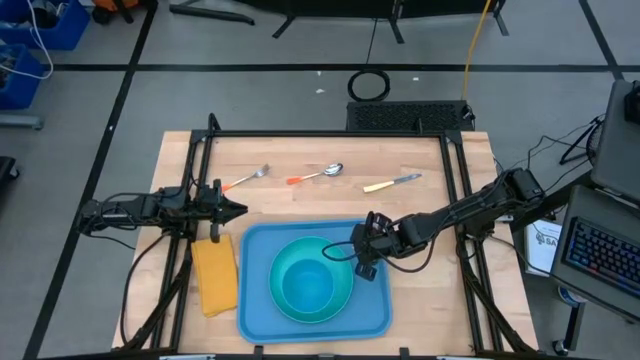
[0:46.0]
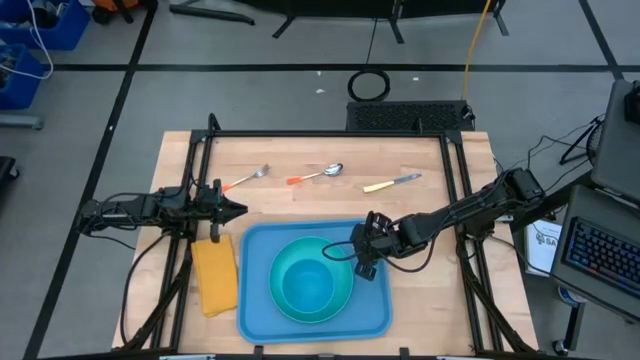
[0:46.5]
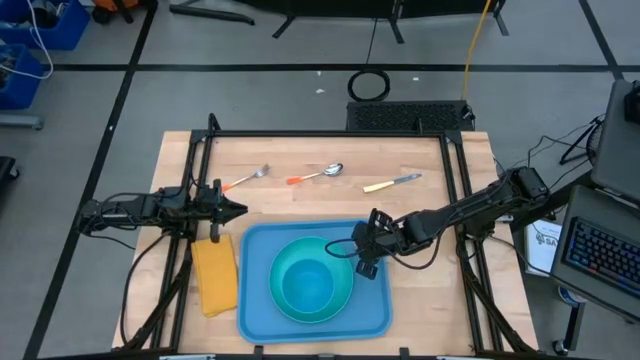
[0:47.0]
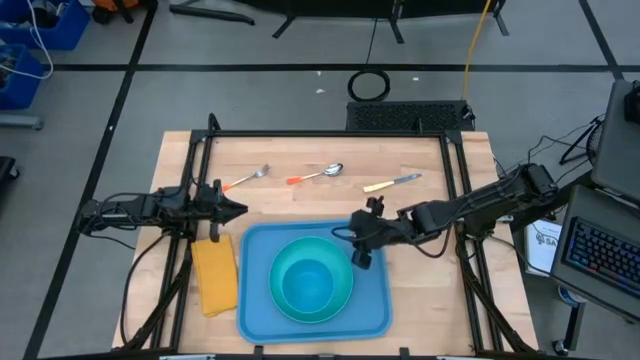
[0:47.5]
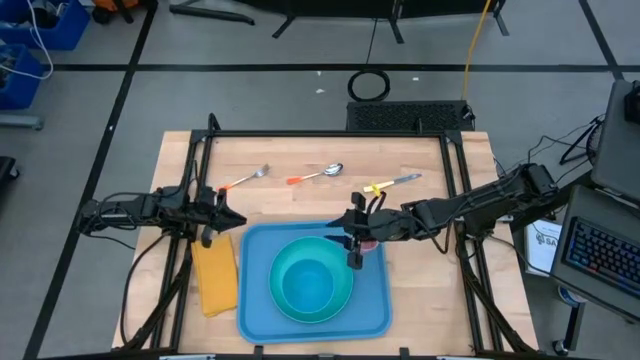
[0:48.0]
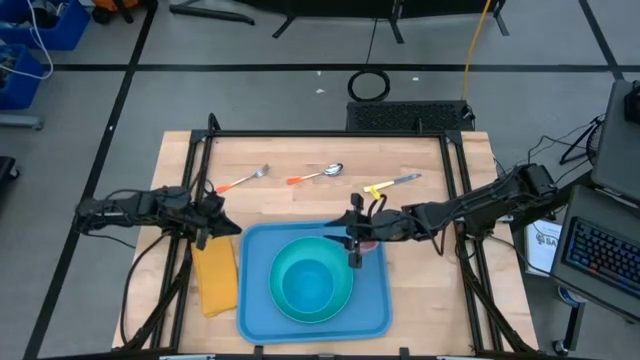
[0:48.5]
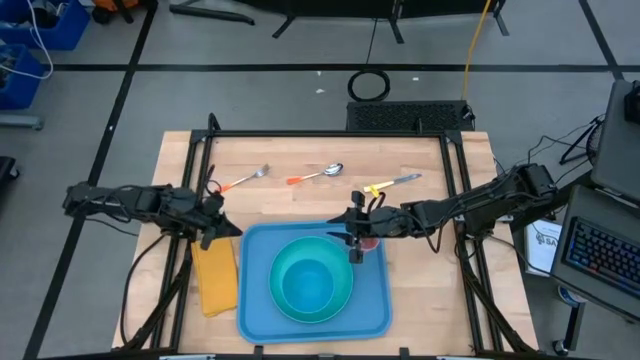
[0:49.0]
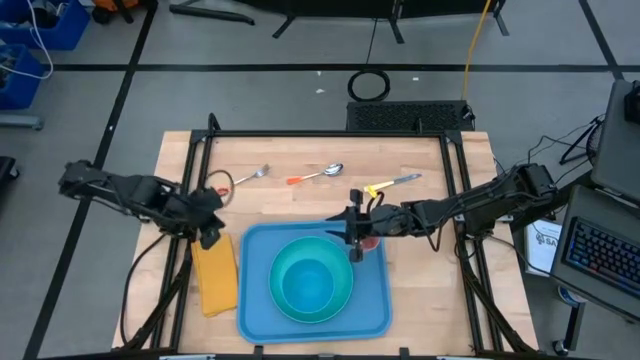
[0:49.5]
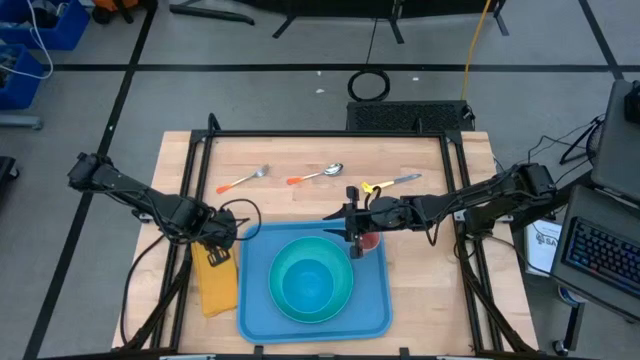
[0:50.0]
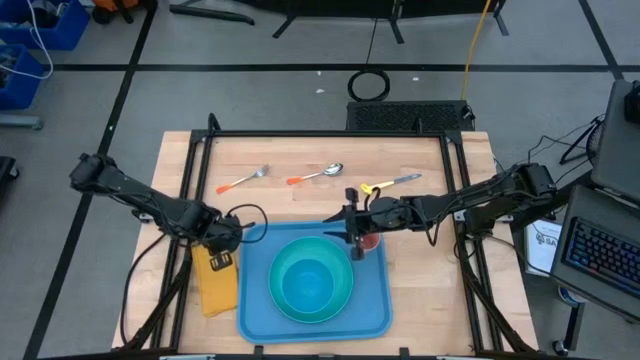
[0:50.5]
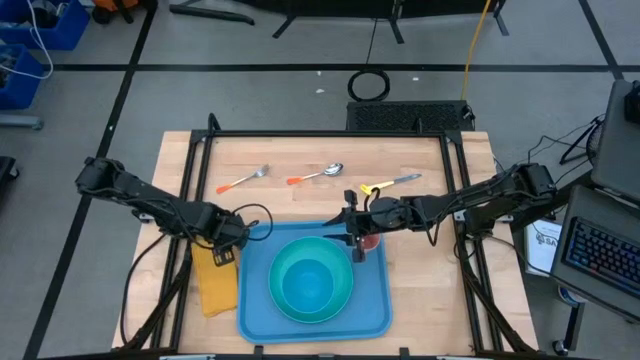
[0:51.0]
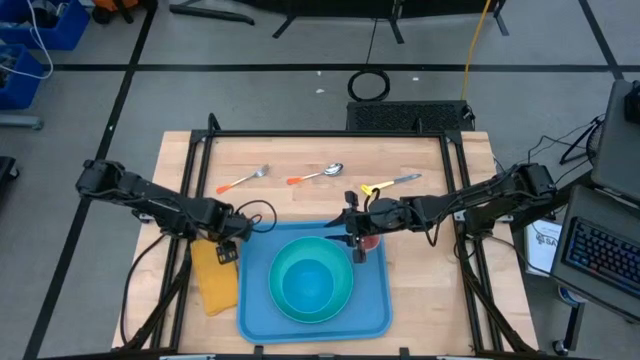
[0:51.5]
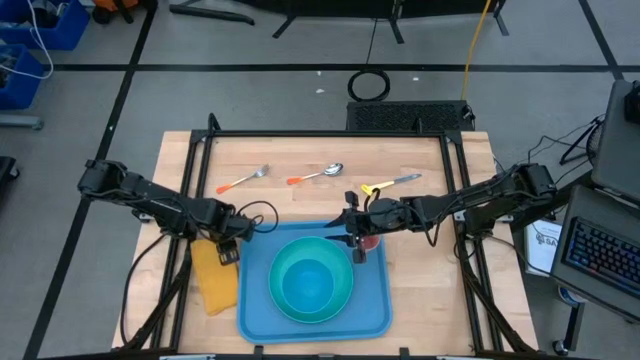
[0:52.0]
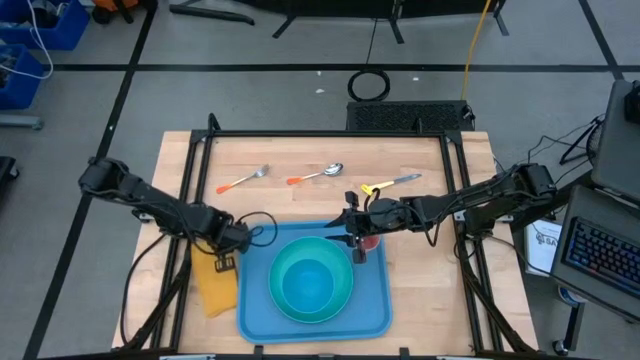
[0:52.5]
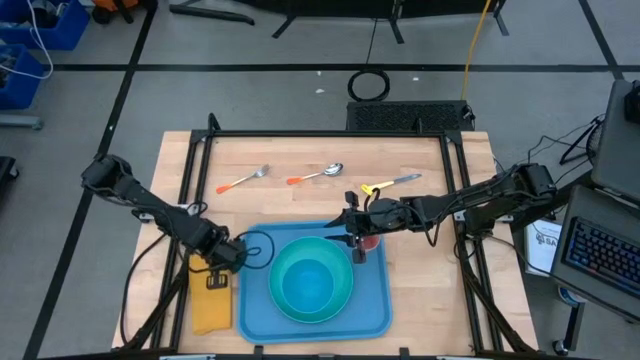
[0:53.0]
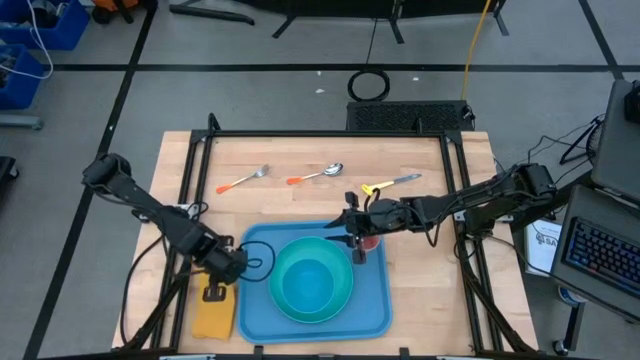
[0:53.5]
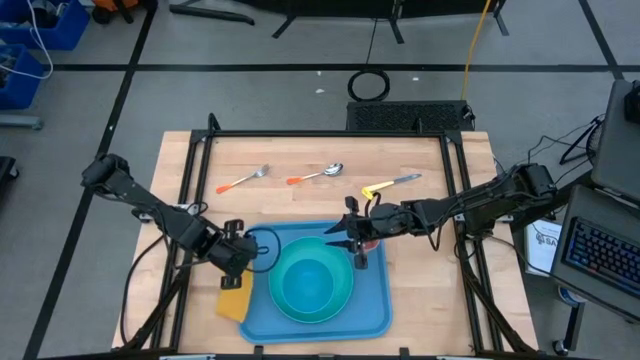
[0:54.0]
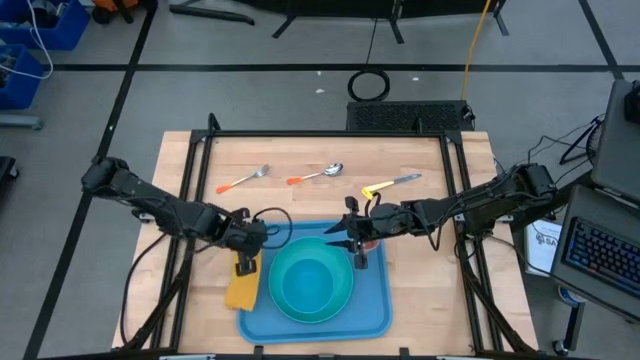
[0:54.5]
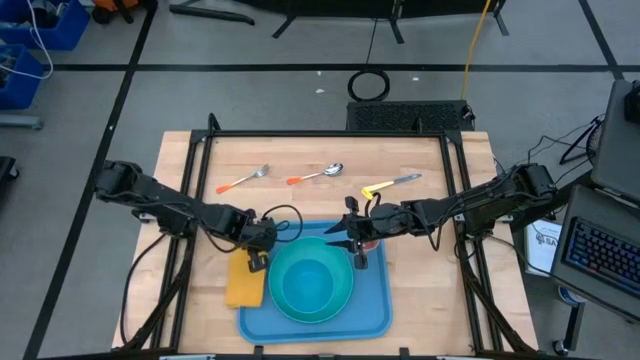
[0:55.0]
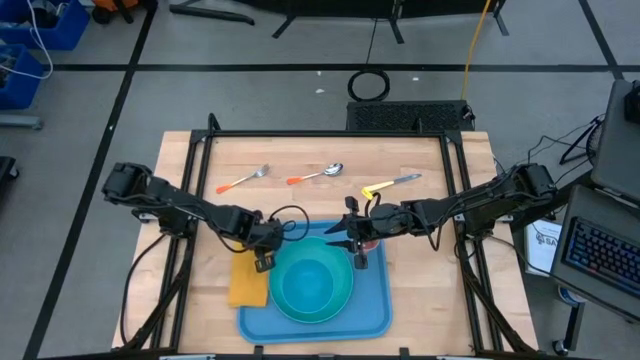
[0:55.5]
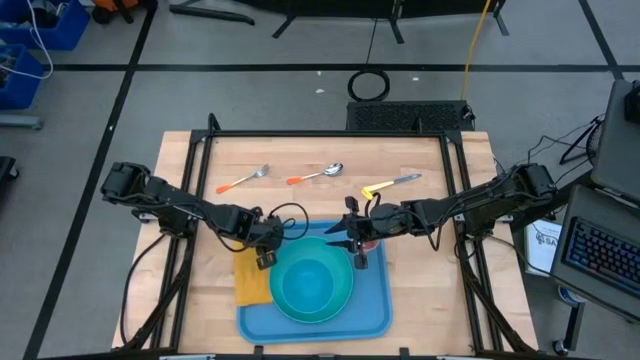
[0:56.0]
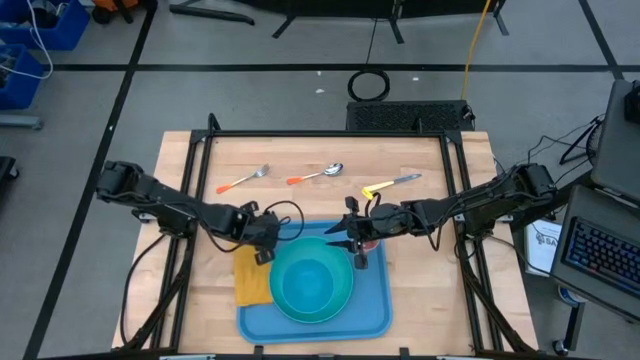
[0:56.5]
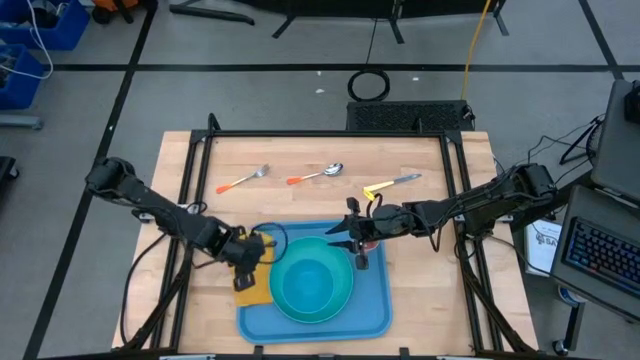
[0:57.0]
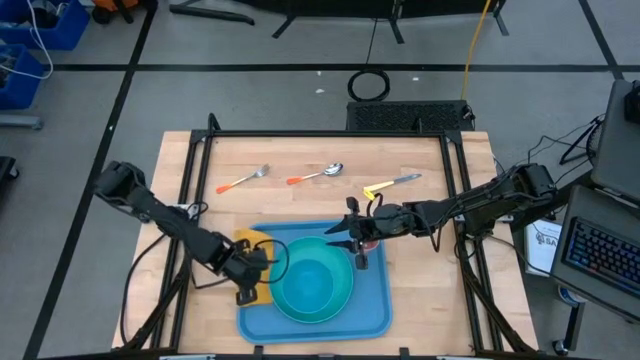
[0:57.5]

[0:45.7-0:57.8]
Task: Set up tray
Put the napkin on the serving tray to the left of the plate

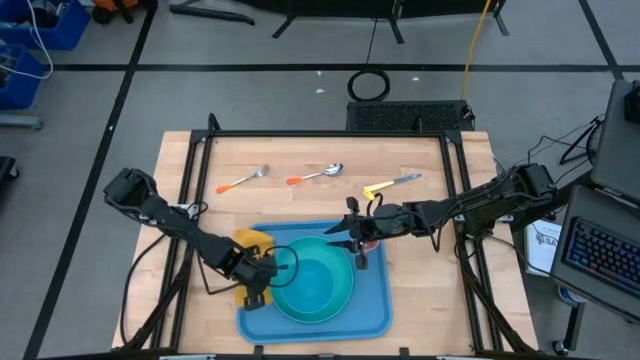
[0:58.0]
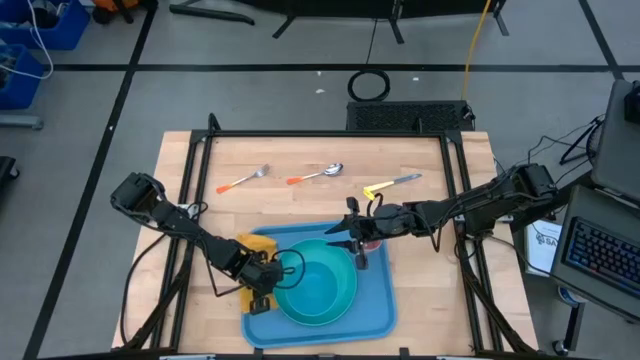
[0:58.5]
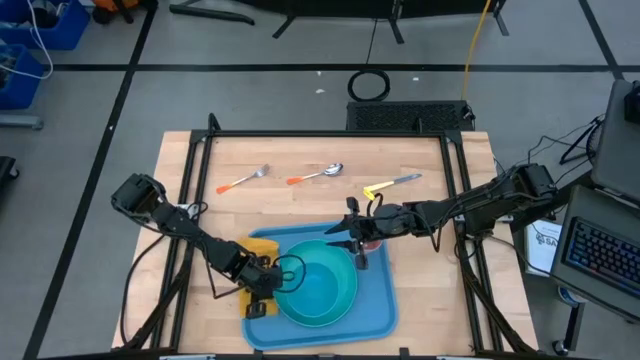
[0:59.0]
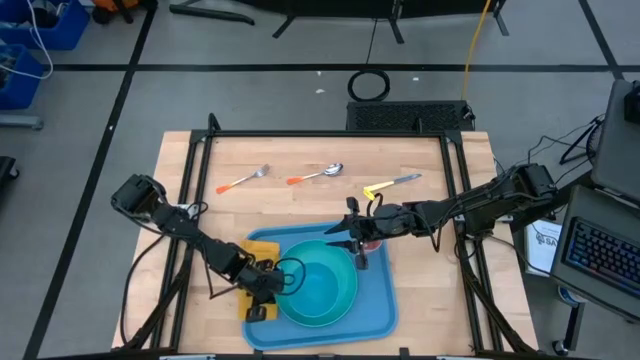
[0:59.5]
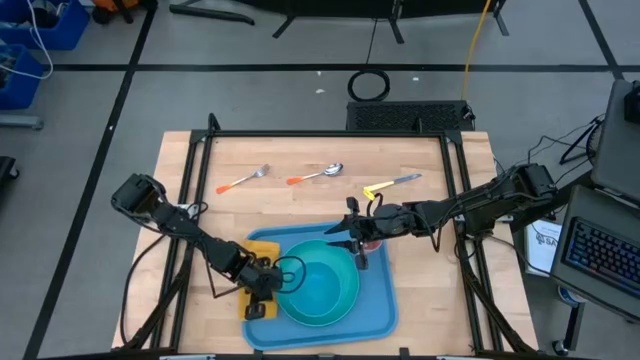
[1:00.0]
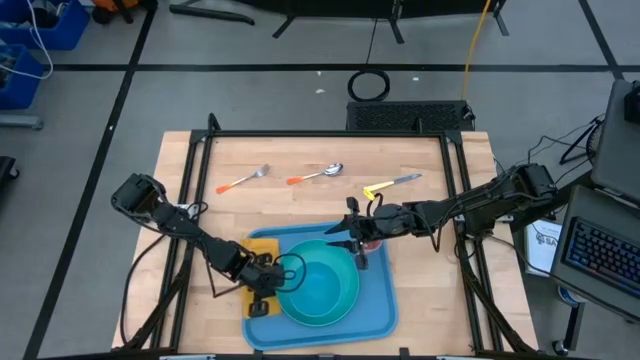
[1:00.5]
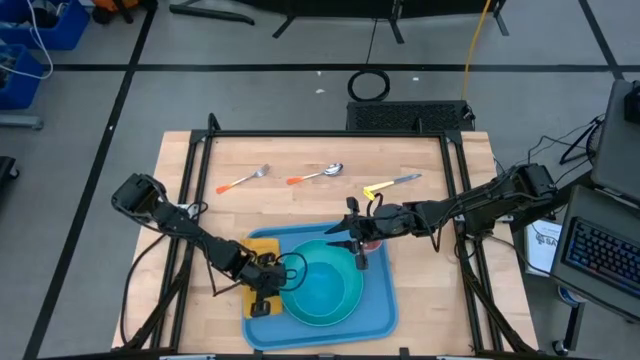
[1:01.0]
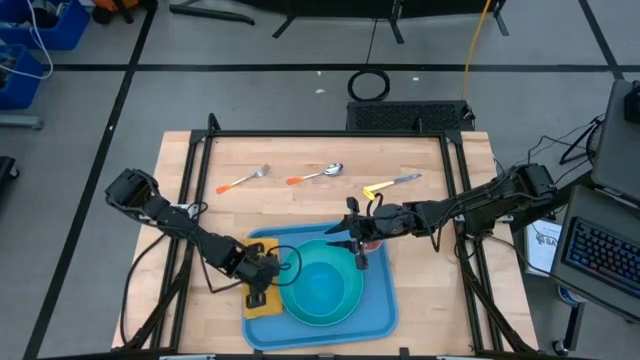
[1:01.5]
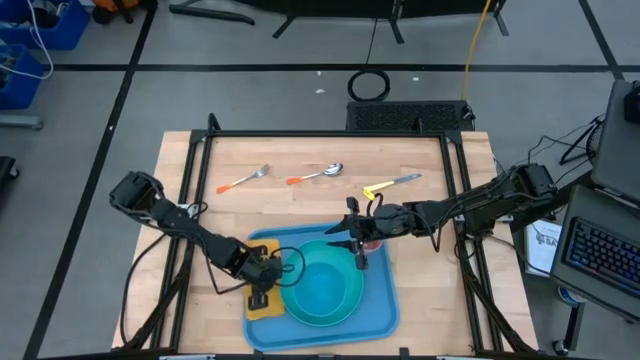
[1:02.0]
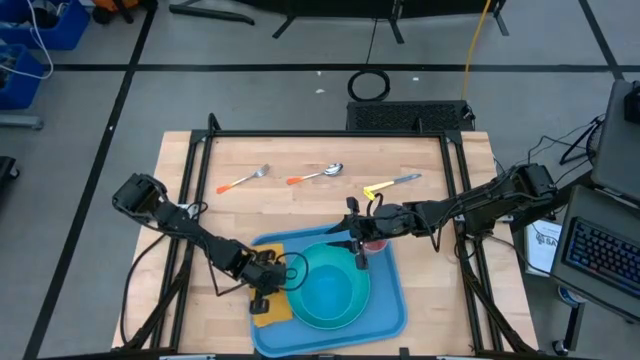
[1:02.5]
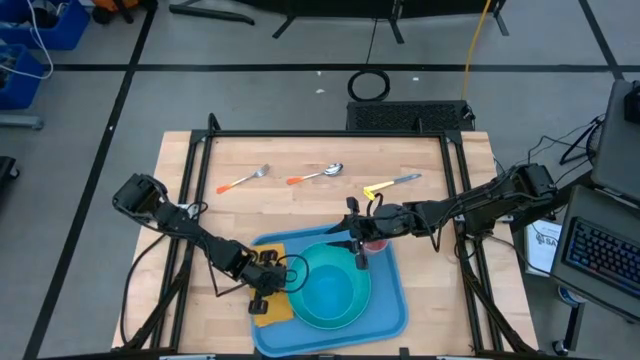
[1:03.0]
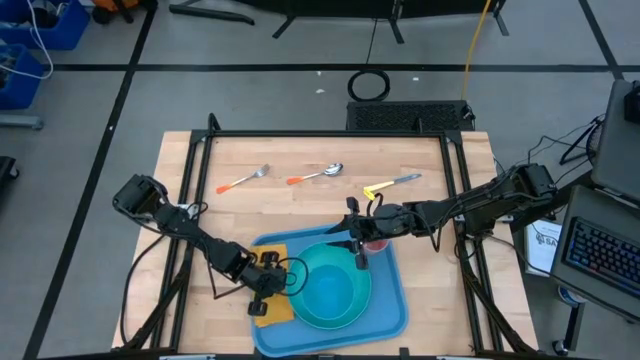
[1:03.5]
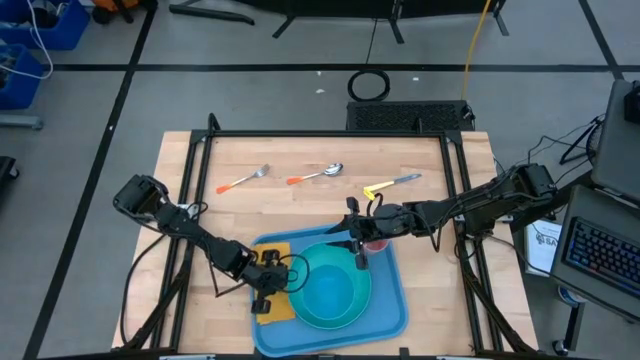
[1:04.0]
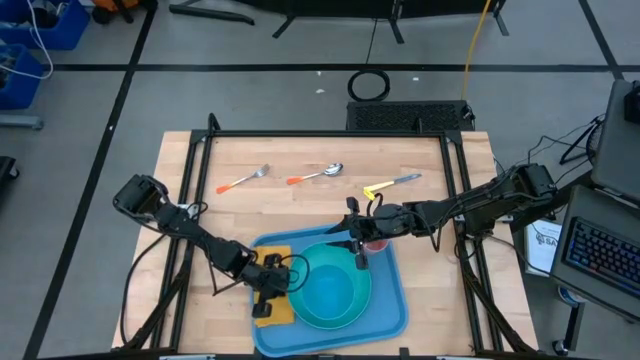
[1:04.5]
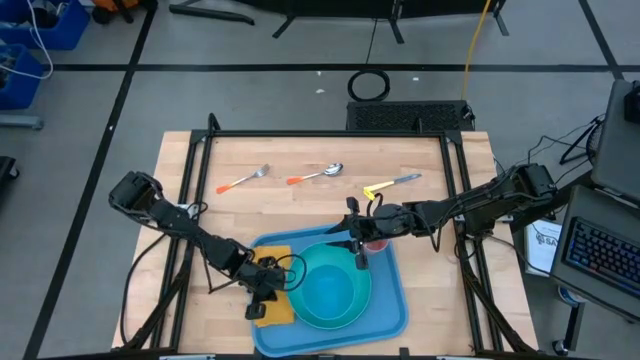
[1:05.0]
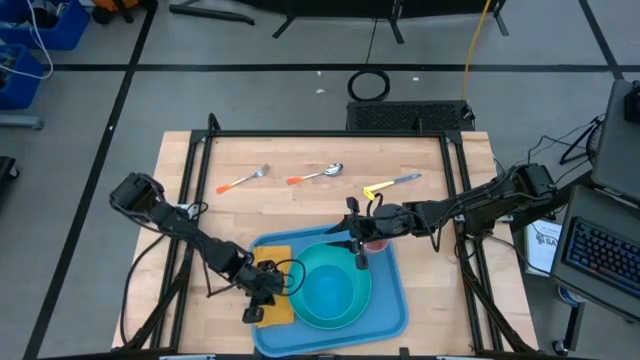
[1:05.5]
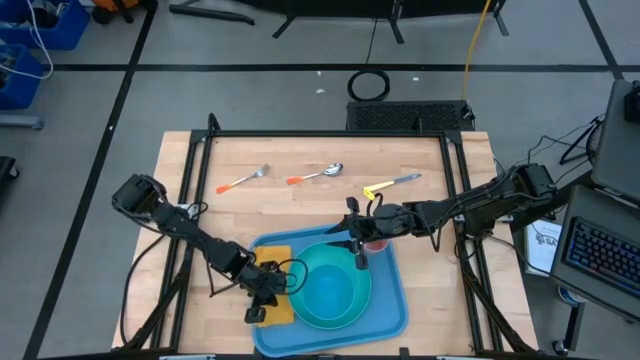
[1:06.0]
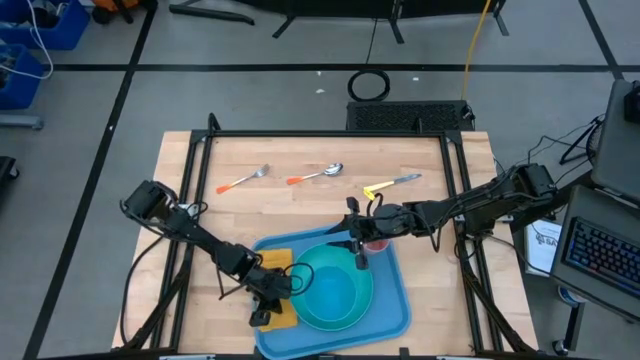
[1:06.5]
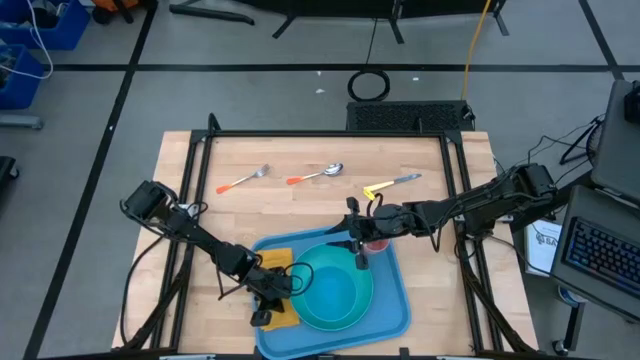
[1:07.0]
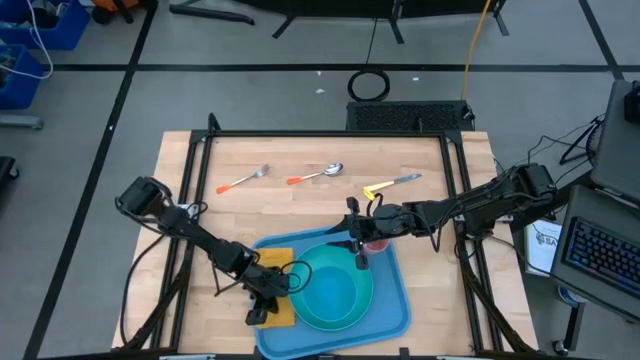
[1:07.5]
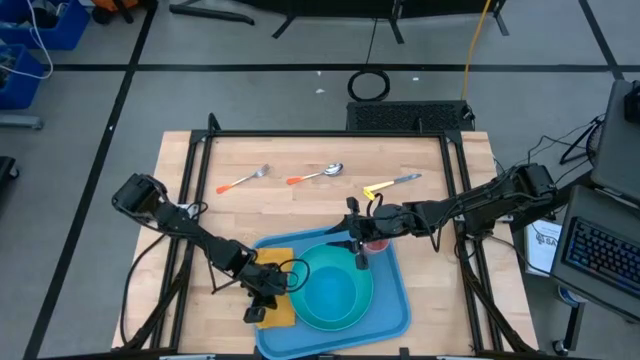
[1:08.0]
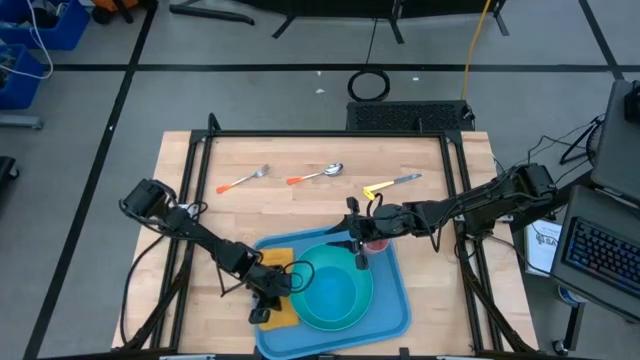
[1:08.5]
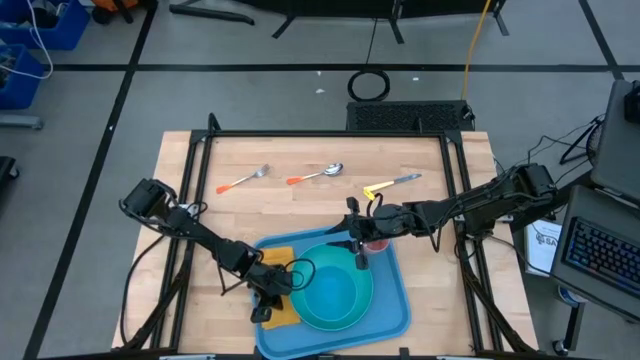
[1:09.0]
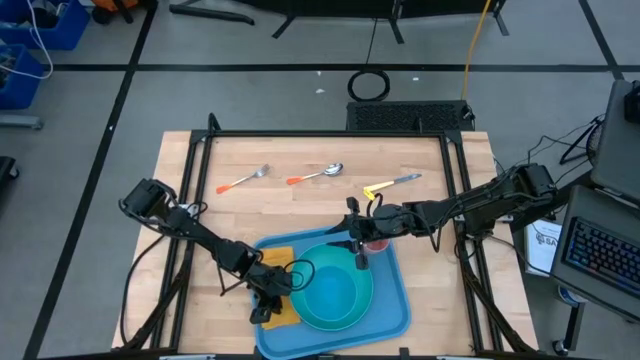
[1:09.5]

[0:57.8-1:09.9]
Put the napkin on the serving tray to the left of the plate
